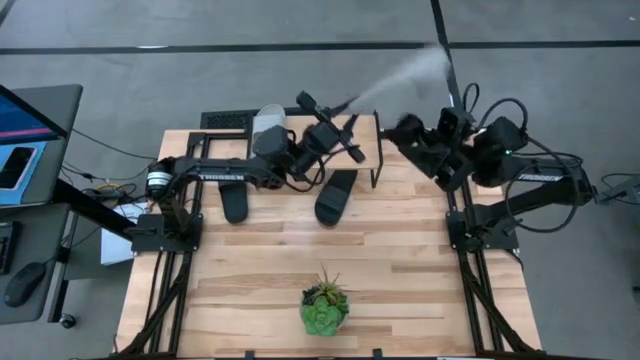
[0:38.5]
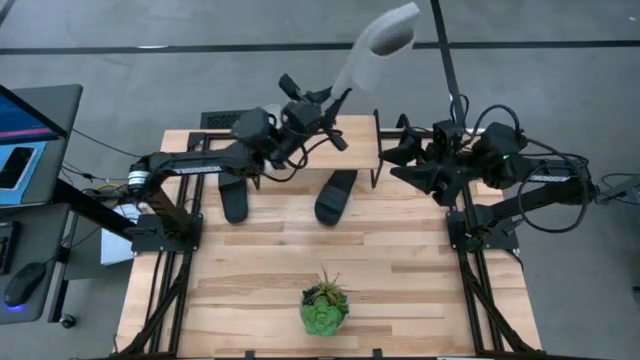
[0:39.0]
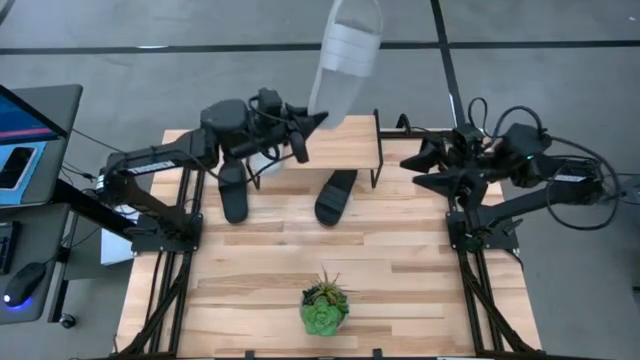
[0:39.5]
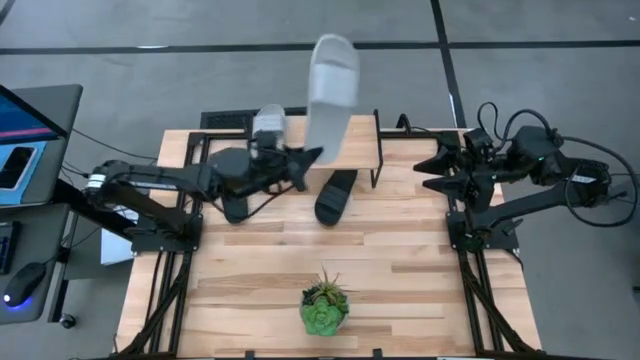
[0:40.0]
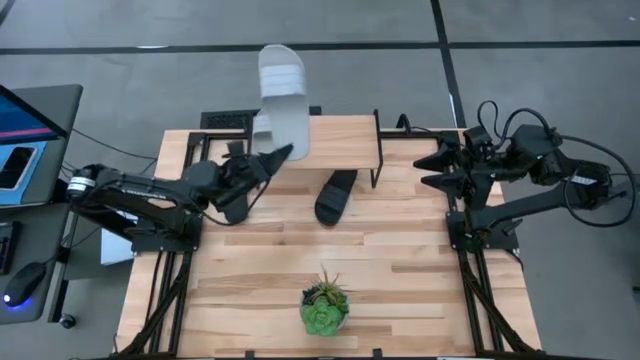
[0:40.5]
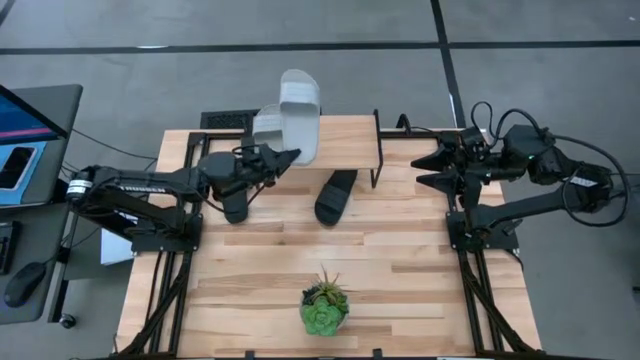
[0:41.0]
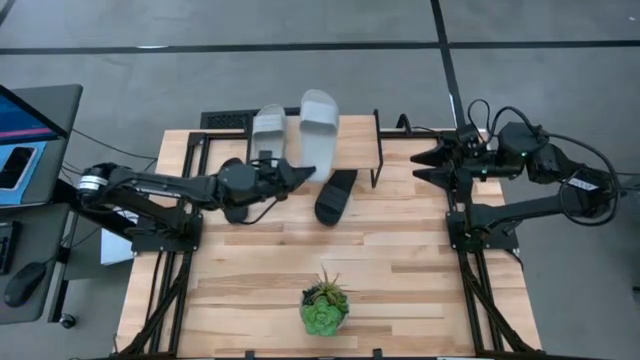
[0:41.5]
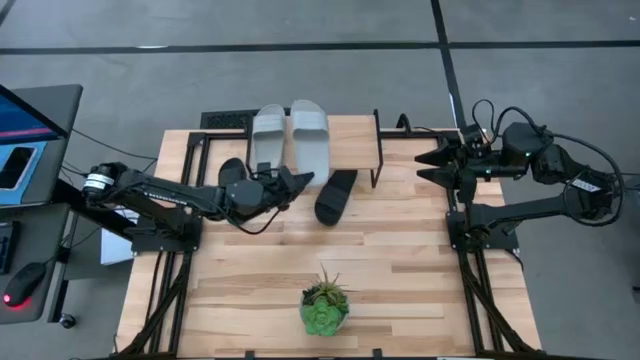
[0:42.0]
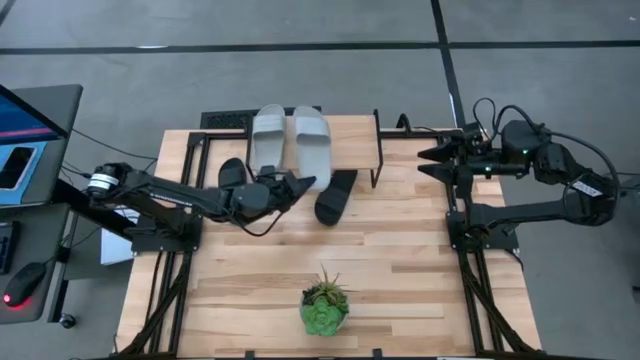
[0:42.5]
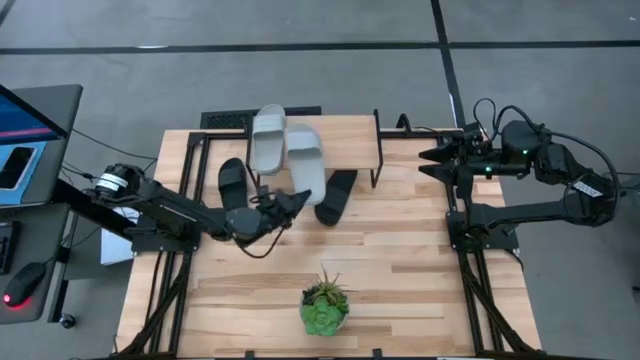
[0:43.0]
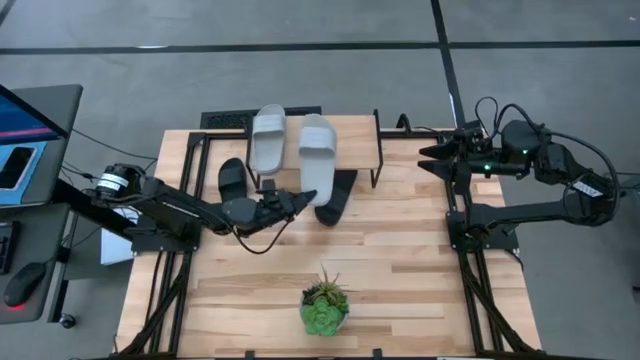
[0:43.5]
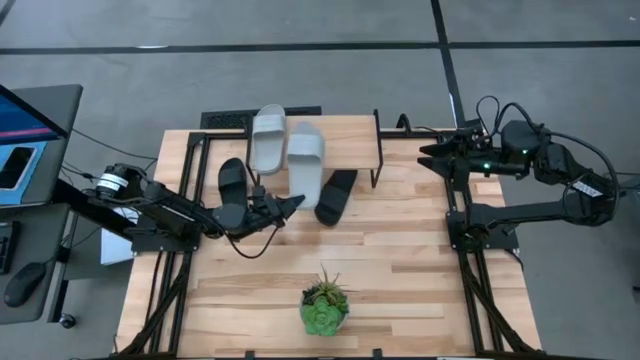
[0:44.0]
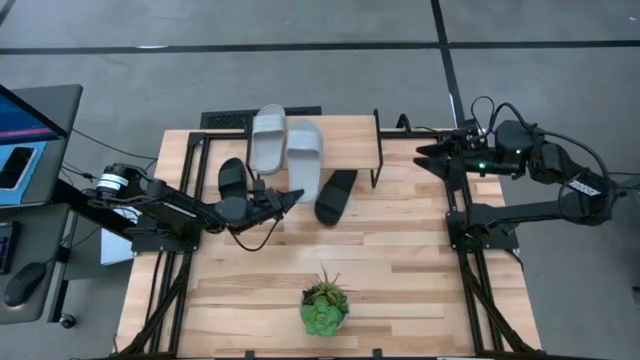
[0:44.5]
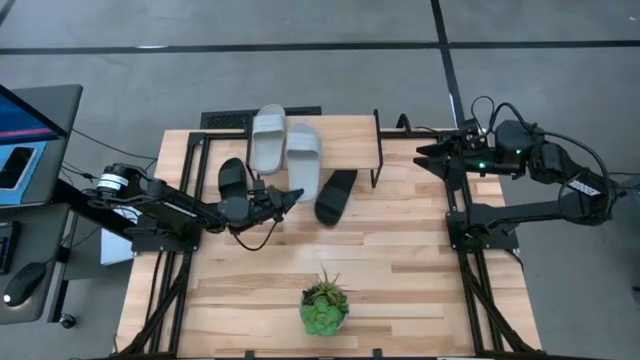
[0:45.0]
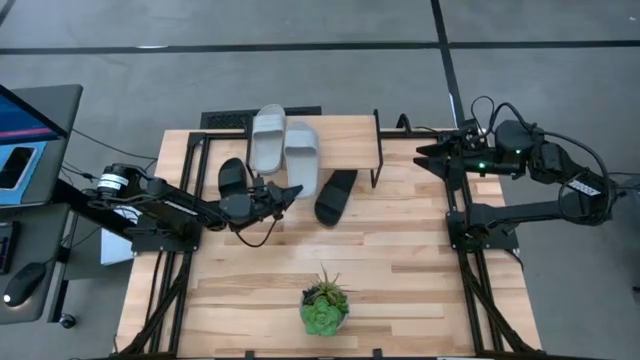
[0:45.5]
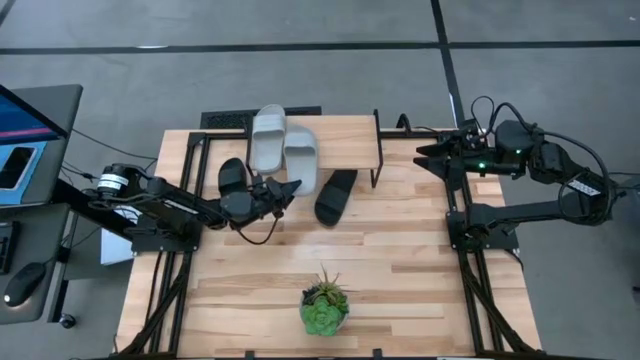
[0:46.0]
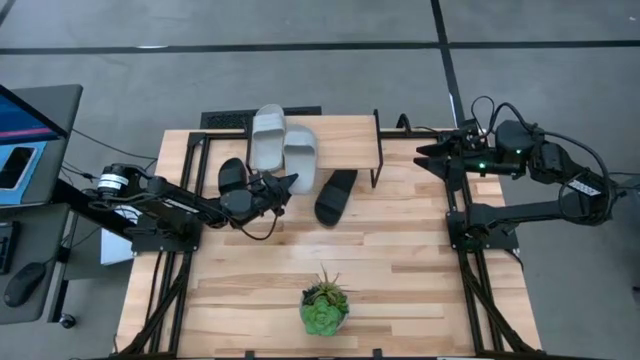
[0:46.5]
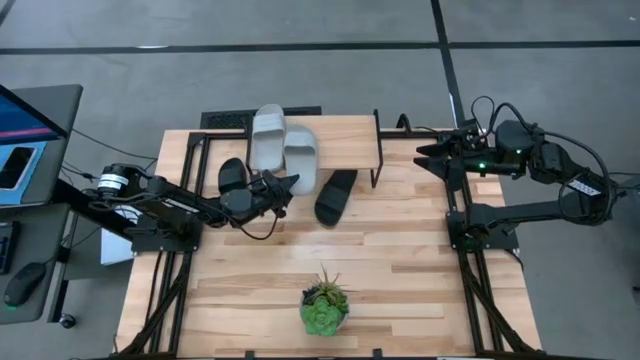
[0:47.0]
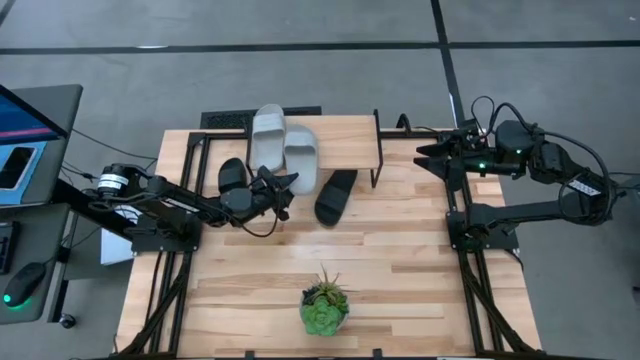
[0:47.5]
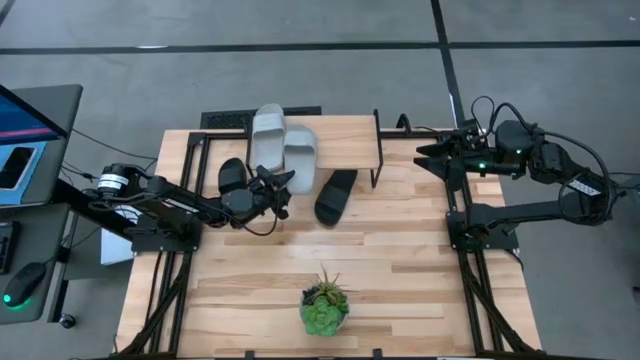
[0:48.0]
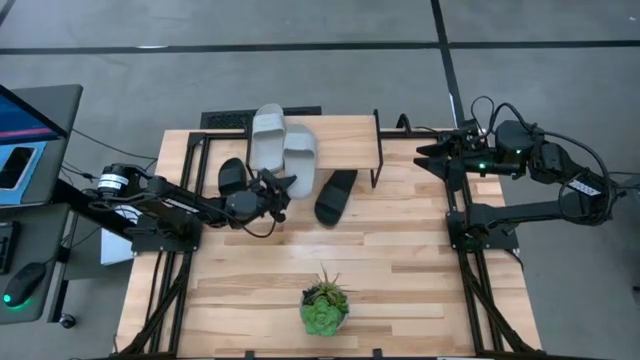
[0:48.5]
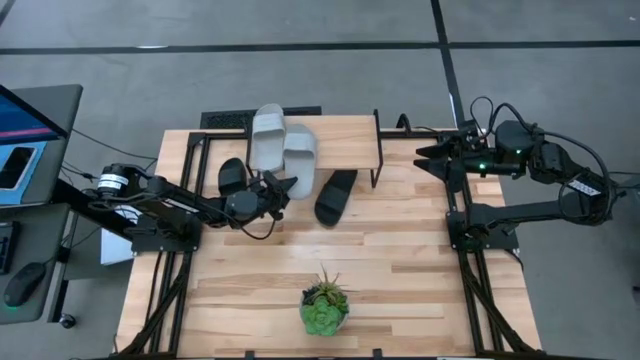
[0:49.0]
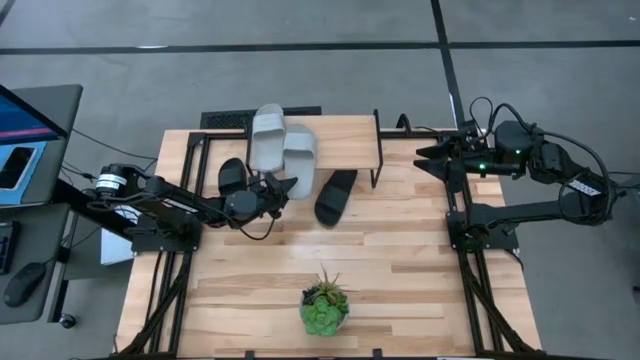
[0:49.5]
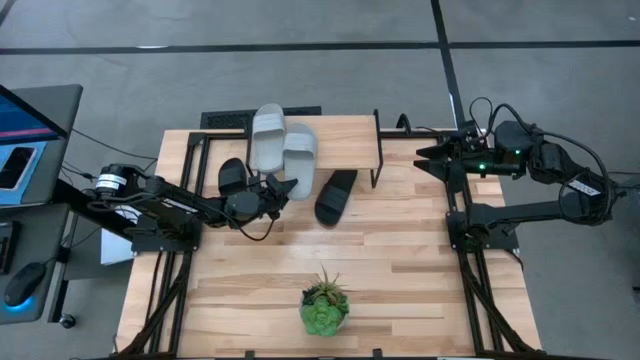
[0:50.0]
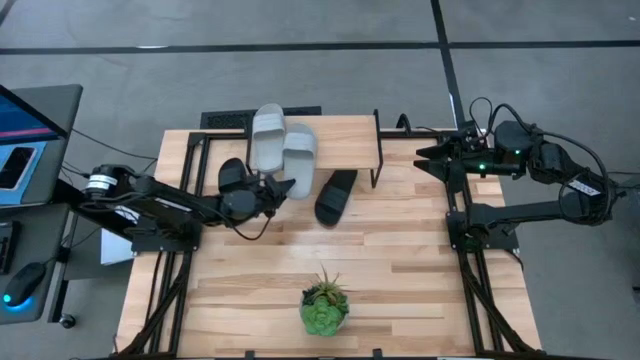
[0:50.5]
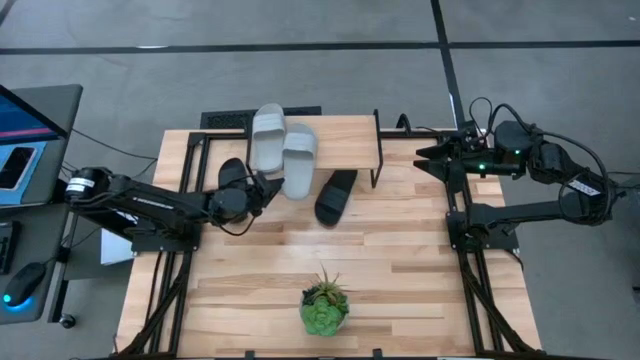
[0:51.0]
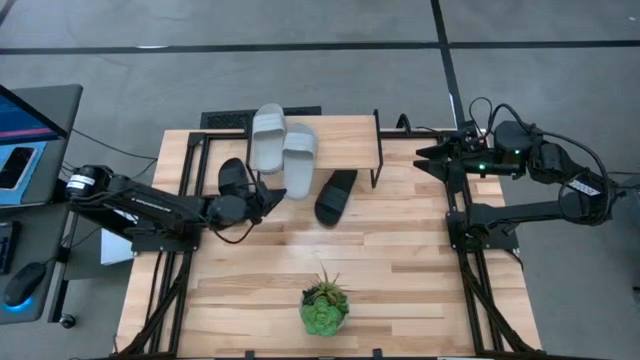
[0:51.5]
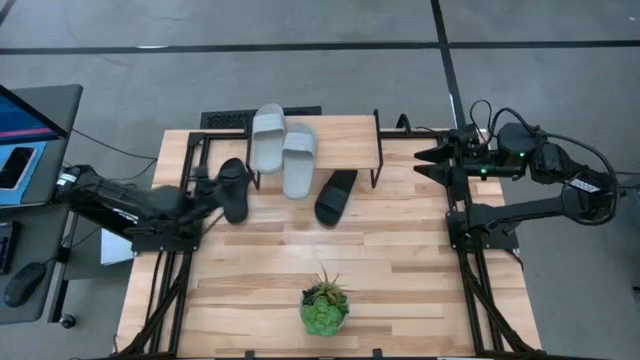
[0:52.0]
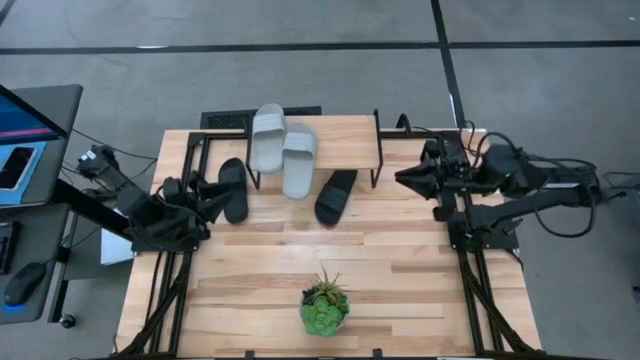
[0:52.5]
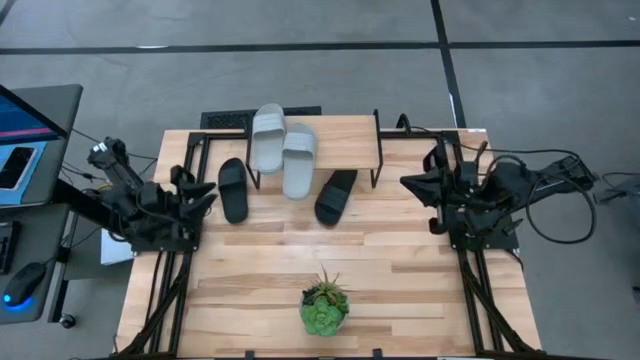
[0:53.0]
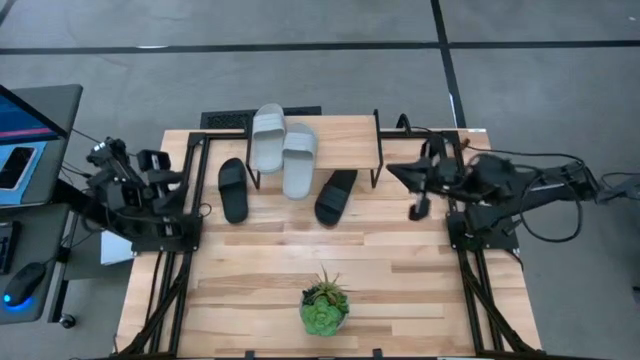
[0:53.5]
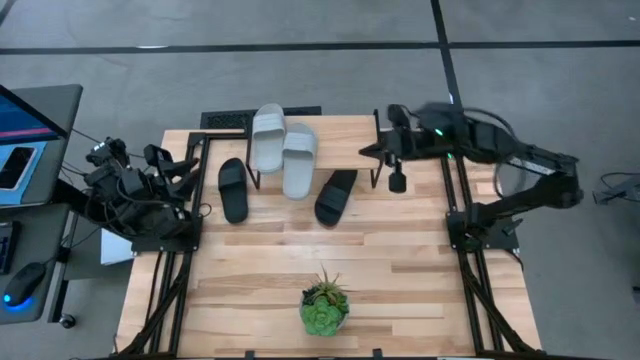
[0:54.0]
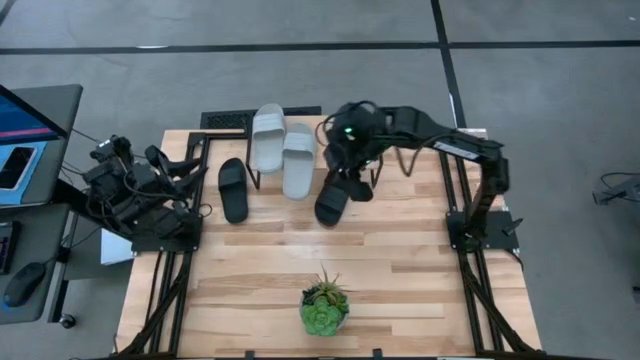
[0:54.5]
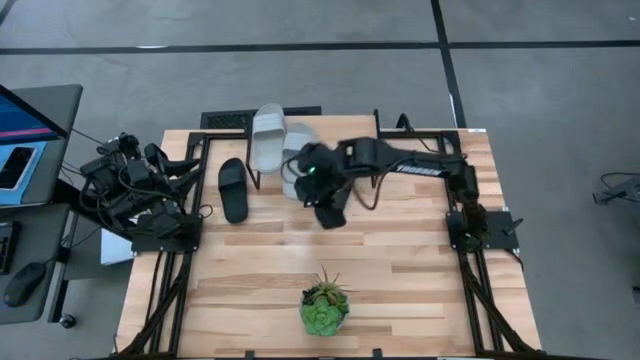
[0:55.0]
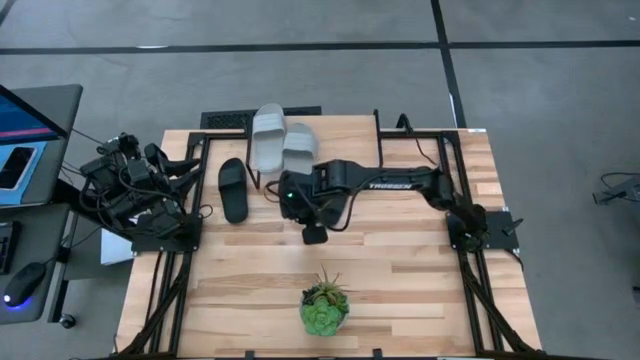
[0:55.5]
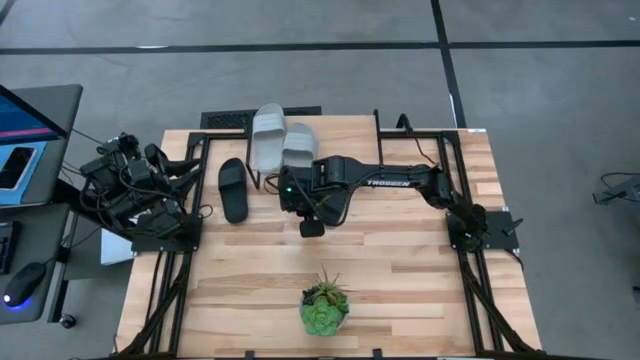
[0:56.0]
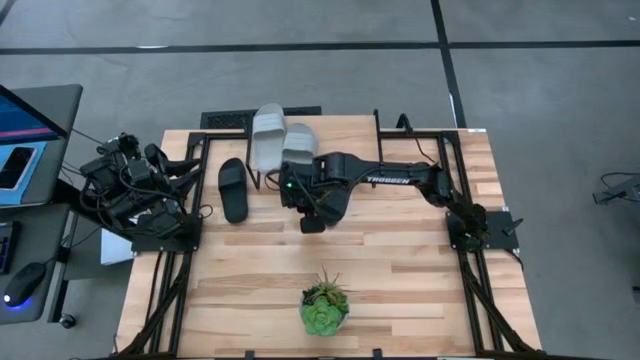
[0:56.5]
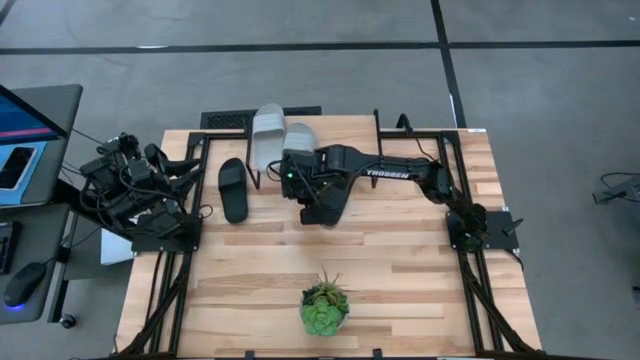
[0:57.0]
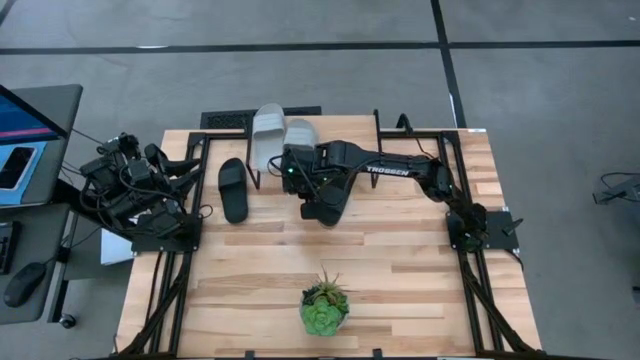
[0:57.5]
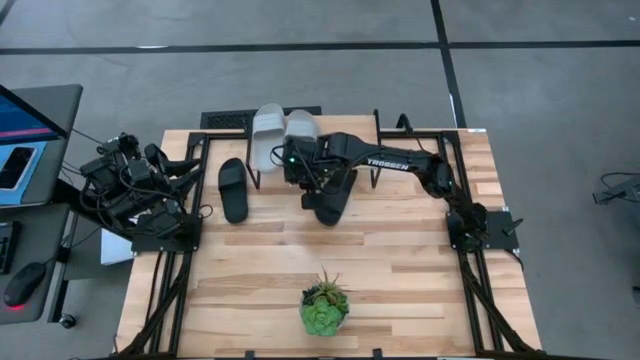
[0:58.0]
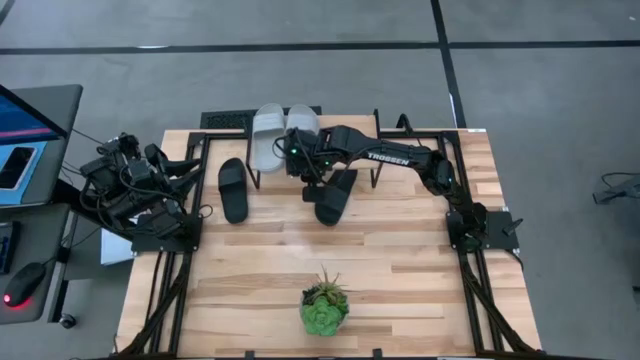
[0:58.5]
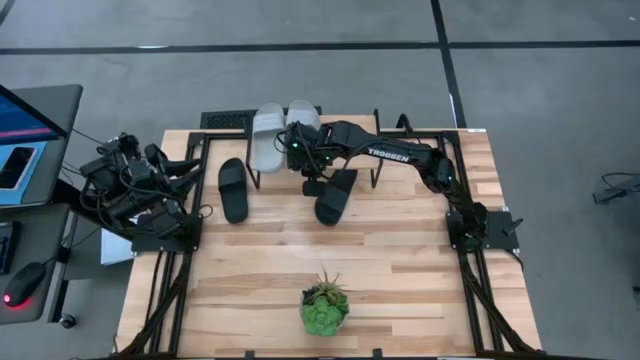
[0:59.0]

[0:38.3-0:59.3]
Task: Pick and place slides into the shelf
Put the gray slide on the shelf
